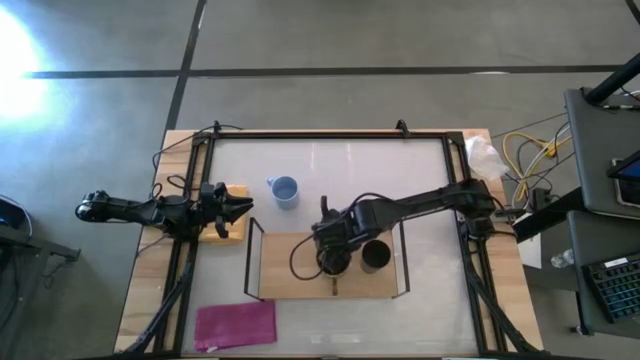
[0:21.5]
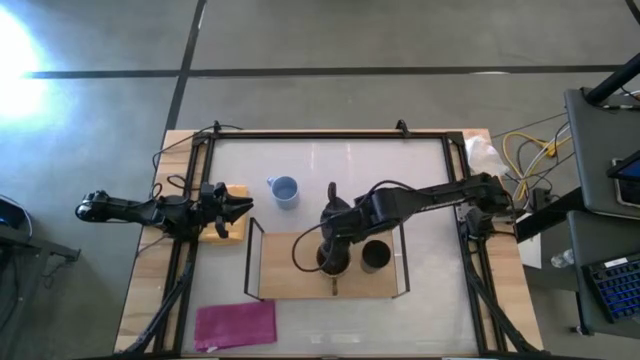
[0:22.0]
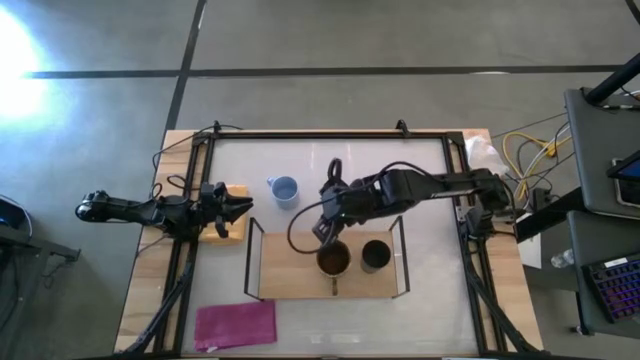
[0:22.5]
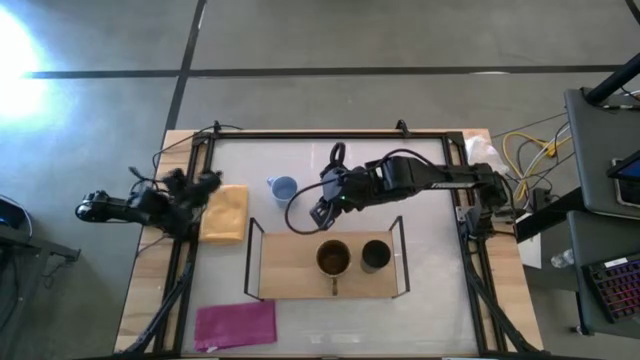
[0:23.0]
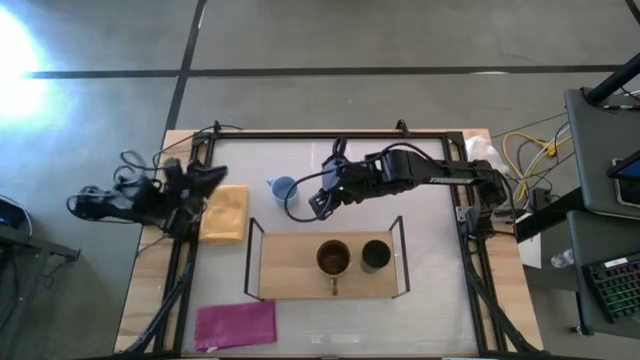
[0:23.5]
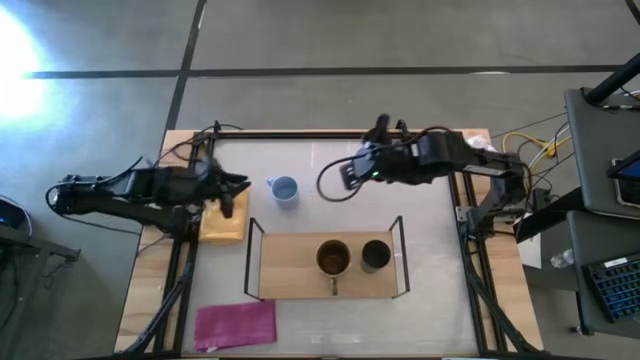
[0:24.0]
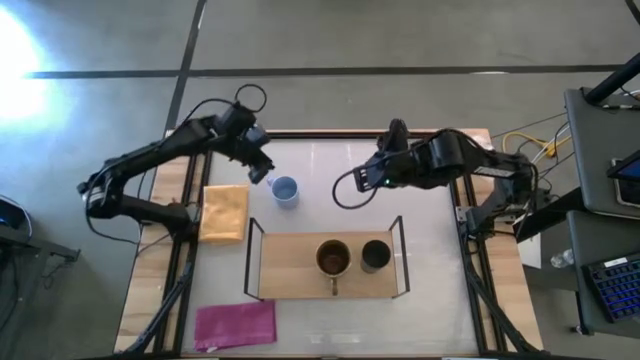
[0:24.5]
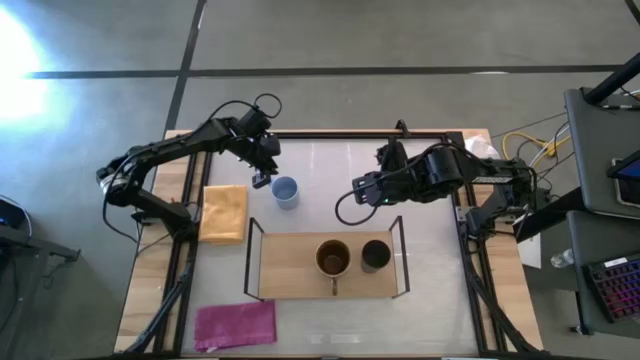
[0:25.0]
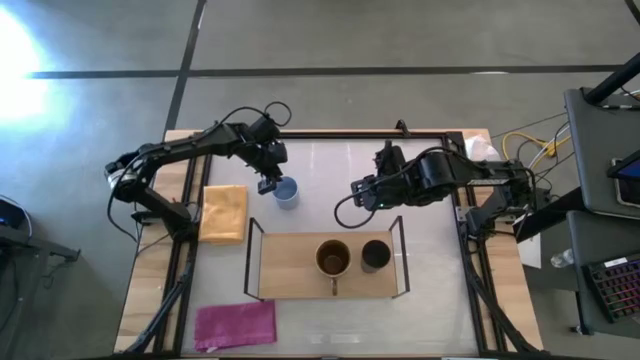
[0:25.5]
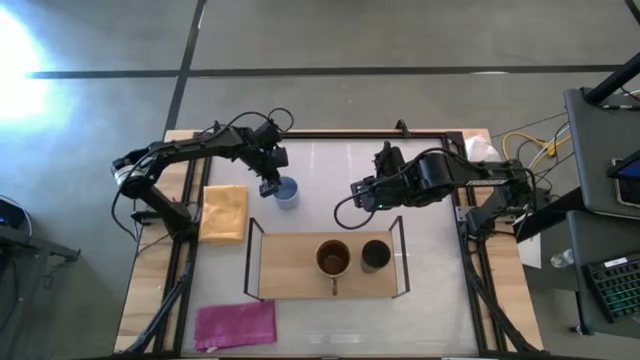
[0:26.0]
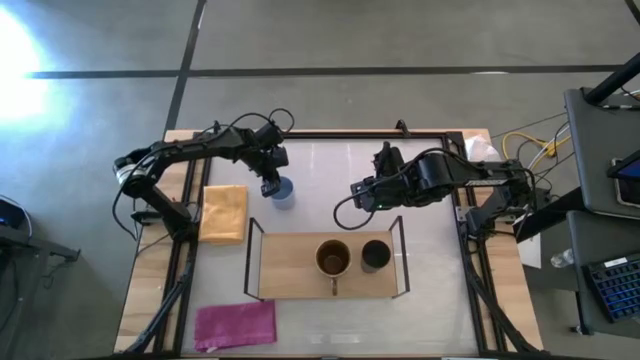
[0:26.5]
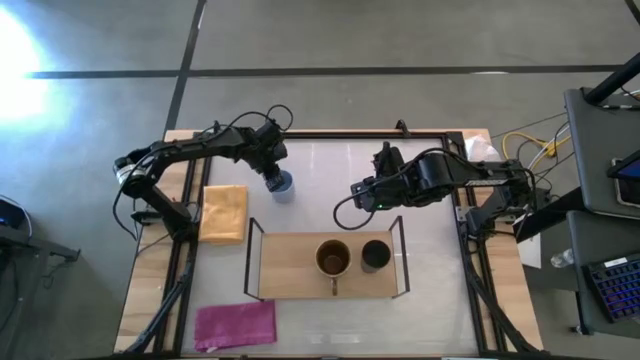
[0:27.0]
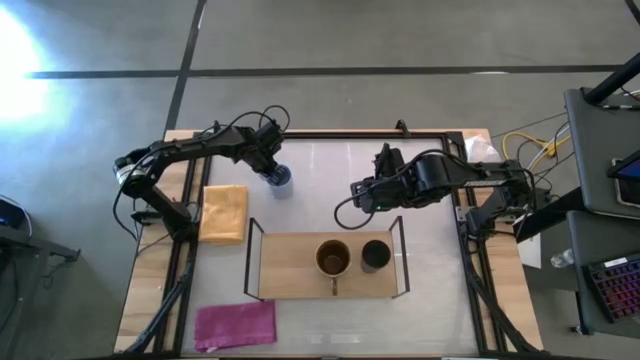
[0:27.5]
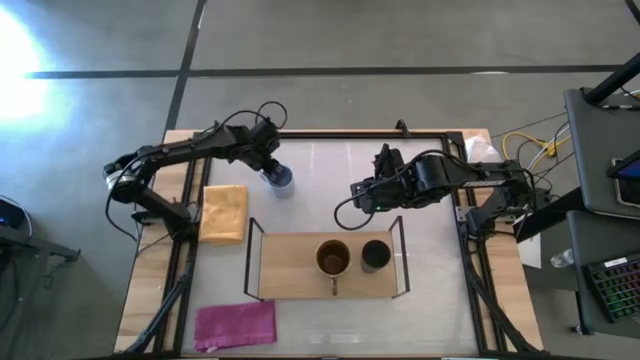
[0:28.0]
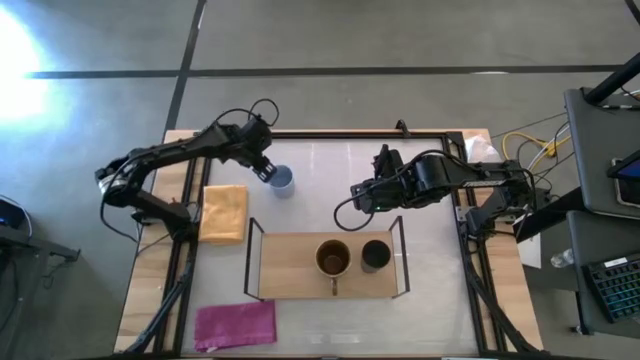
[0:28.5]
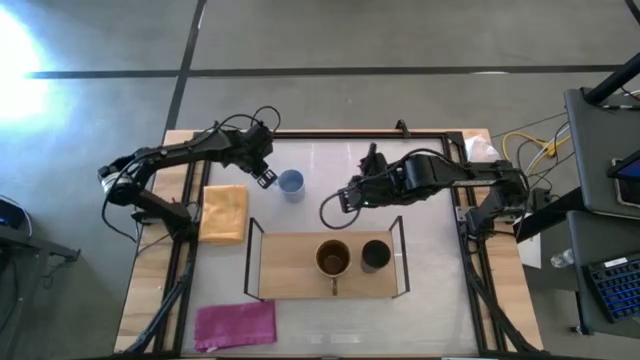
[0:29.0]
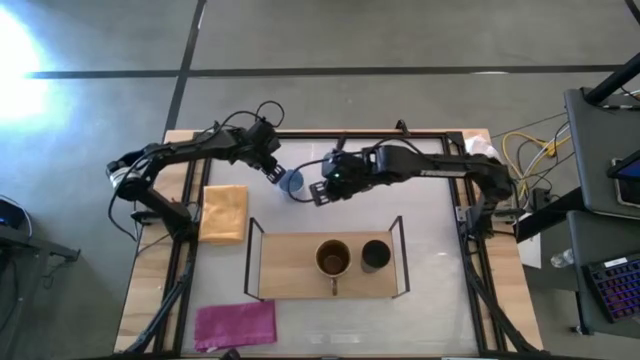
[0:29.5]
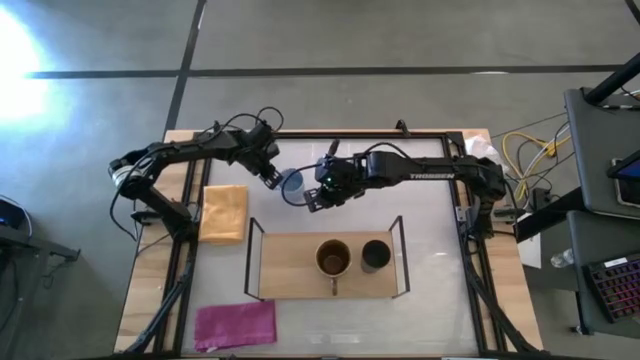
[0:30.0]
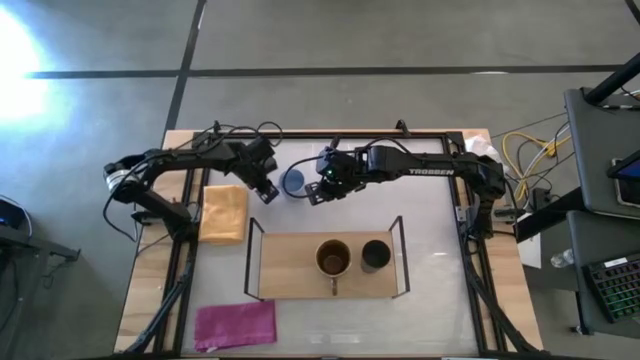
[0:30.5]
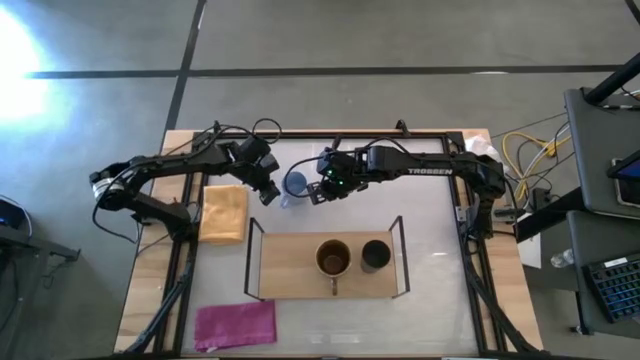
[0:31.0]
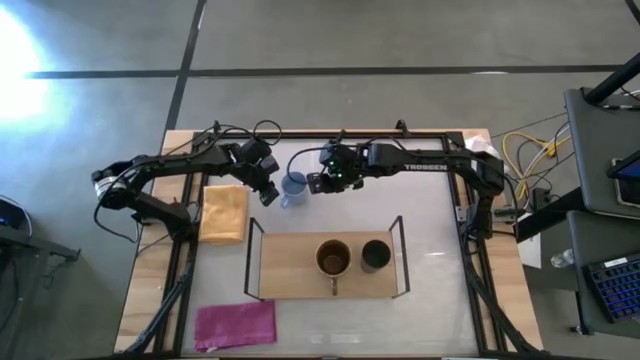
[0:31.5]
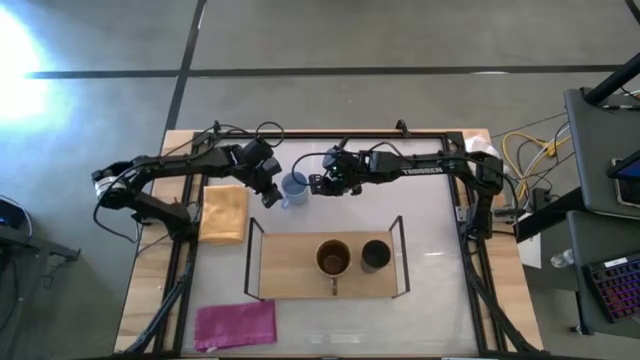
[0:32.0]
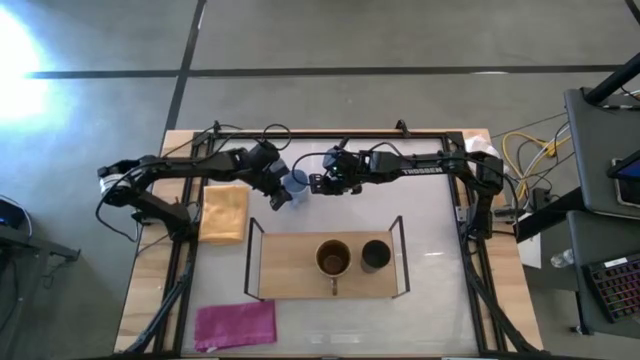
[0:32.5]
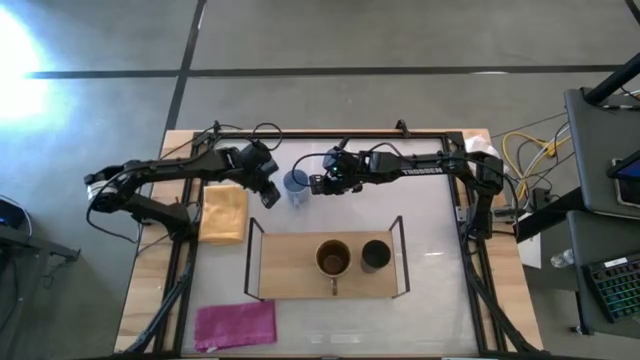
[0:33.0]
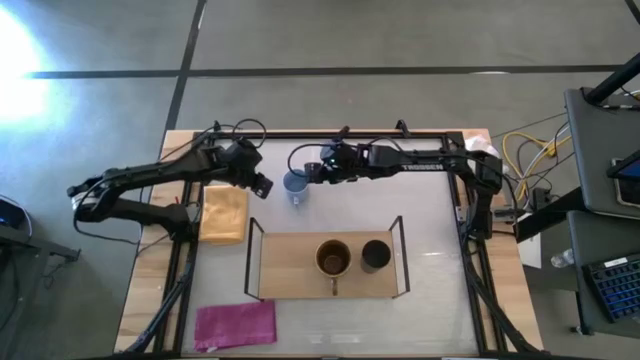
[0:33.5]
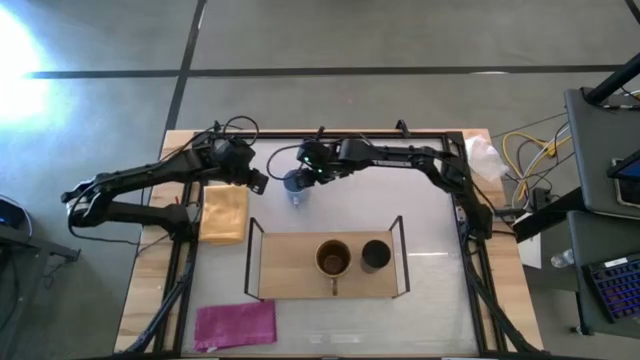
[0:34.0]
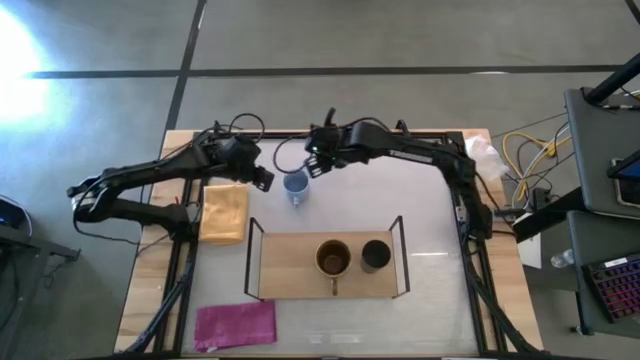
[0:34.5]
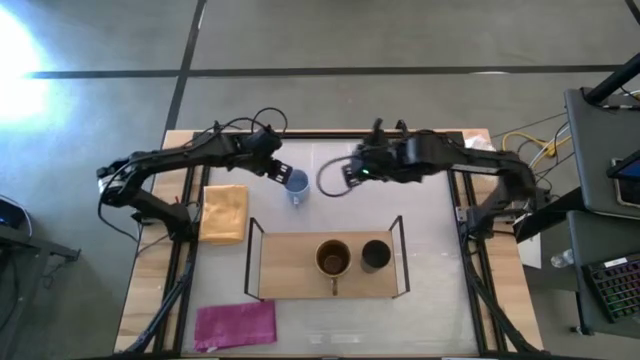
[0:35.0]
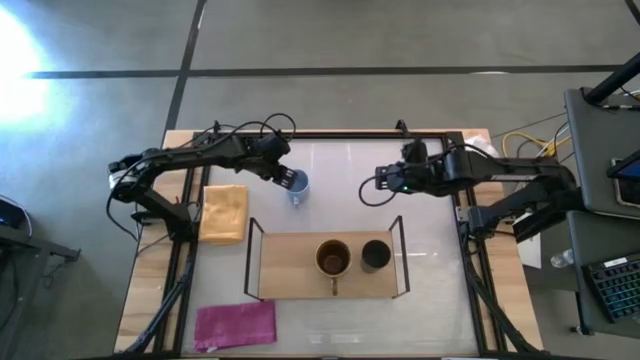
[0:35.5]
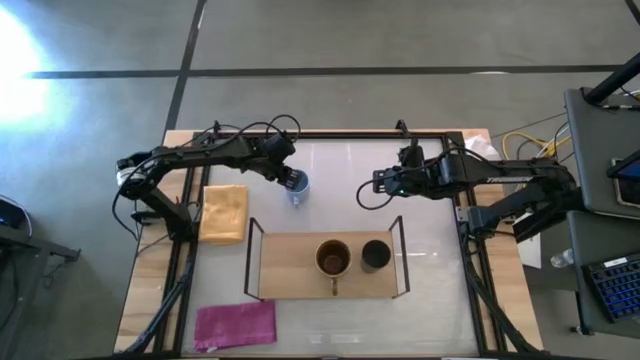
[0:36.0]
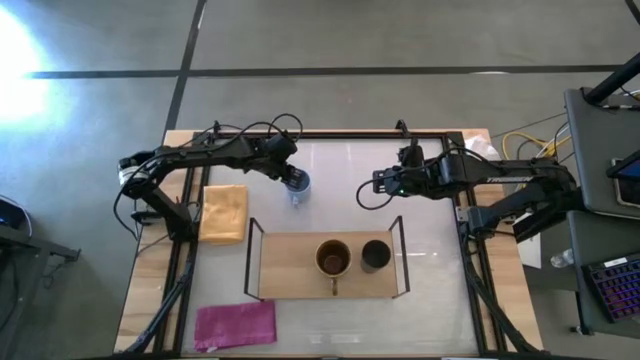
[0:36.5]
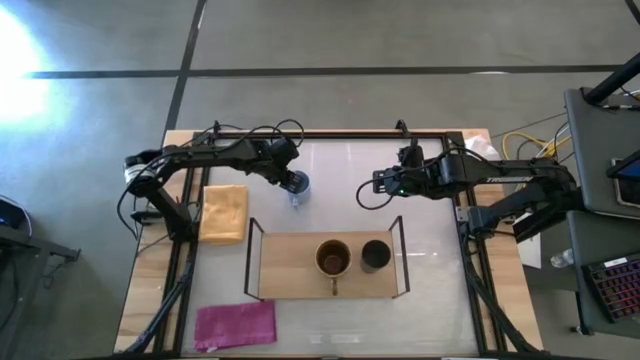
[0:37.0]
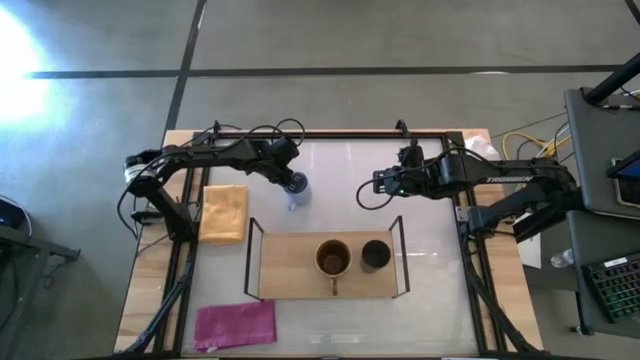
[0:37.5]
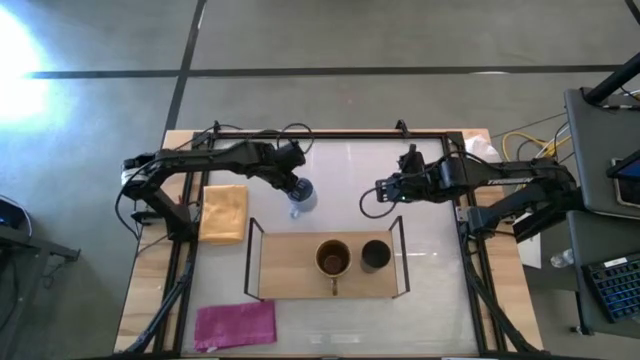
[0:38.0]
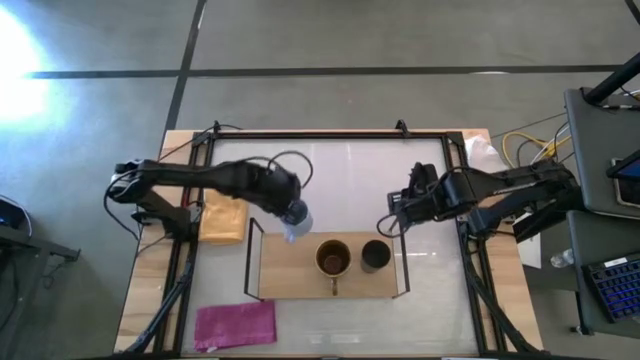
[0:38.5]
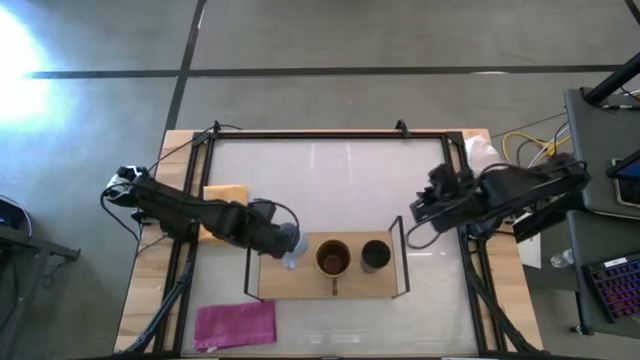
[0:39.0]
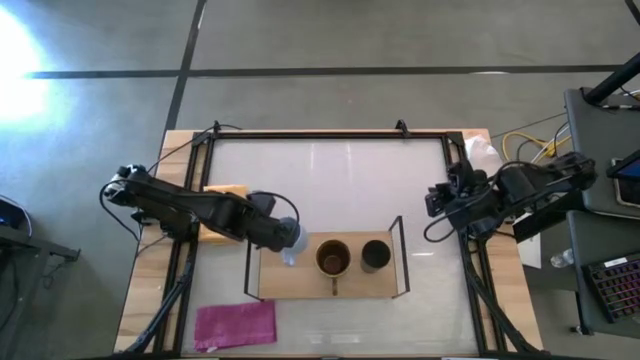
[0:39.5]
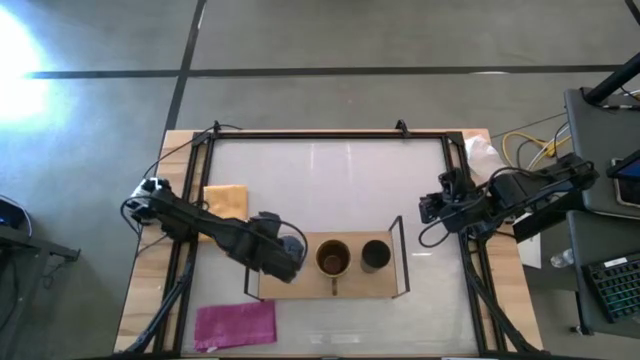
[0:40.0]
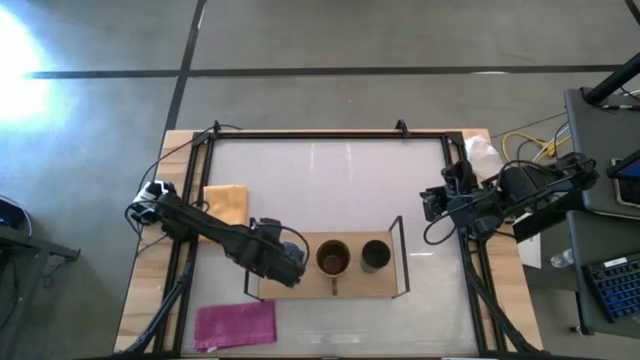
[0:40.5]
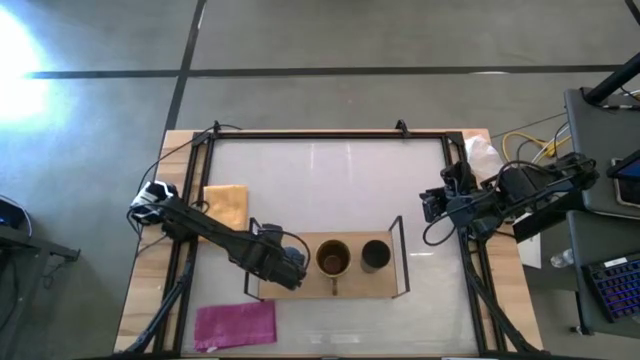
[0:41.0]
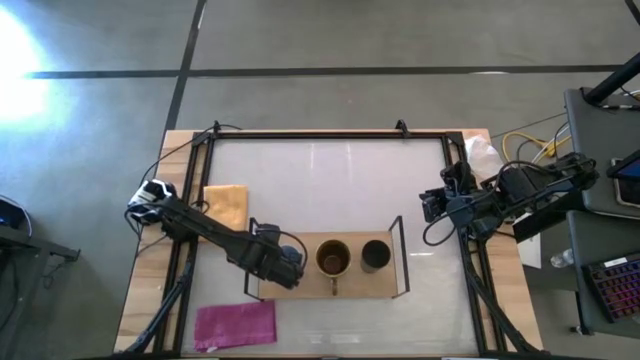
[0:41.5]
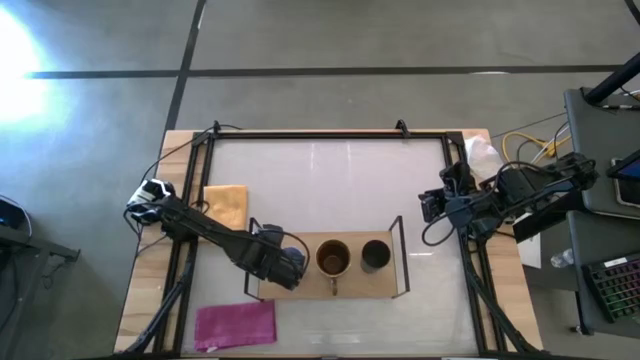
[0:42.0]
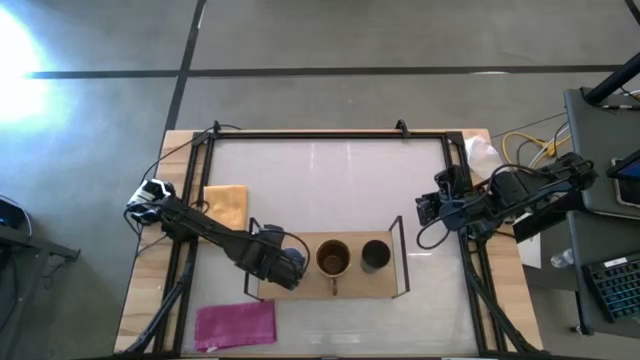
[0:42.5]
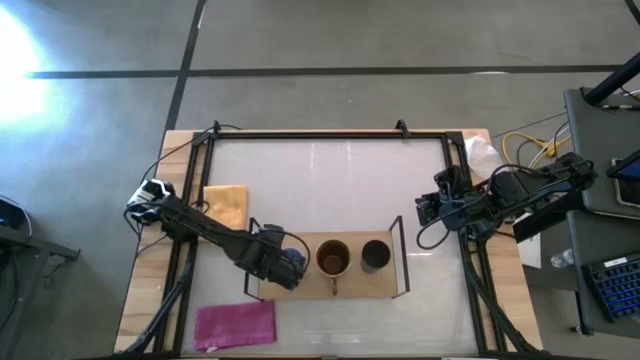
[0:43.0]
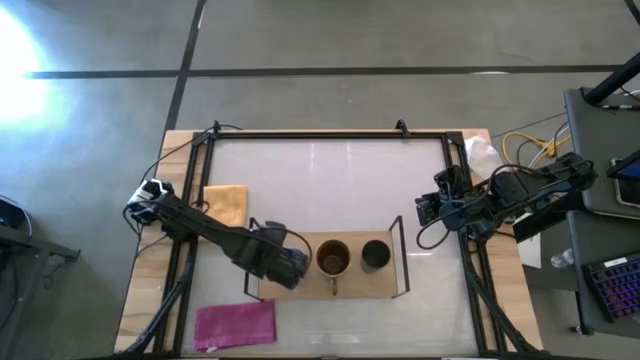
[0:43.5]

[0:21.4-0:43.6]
Task: Stack small to large cups/mugs on shelf
Put the blue mug on the shelf
